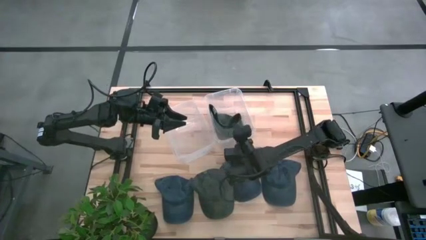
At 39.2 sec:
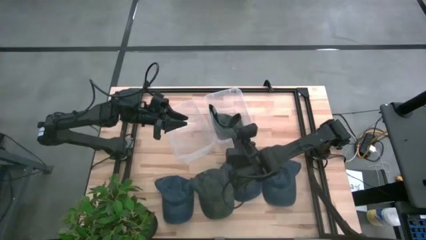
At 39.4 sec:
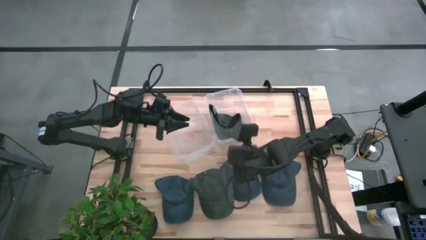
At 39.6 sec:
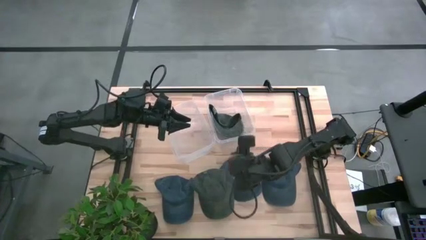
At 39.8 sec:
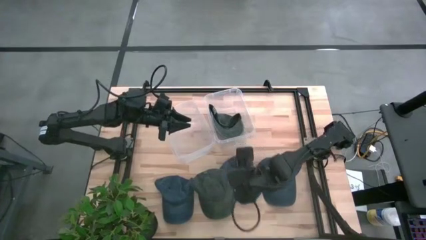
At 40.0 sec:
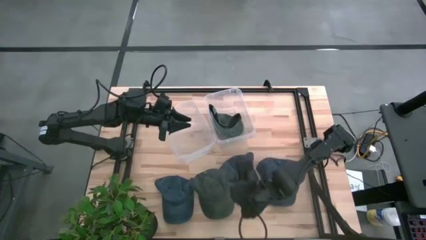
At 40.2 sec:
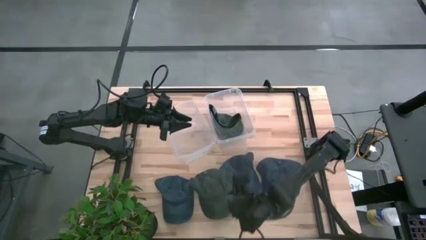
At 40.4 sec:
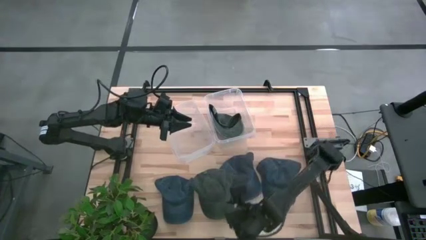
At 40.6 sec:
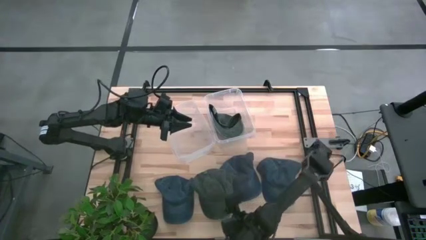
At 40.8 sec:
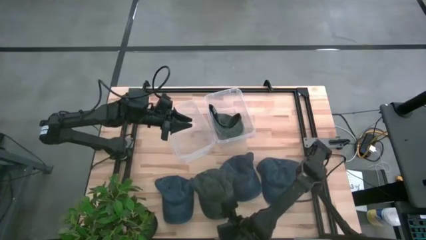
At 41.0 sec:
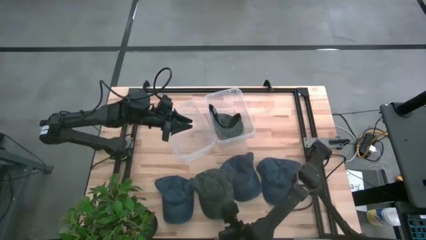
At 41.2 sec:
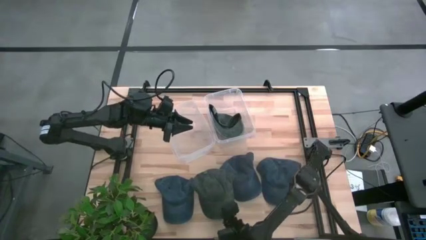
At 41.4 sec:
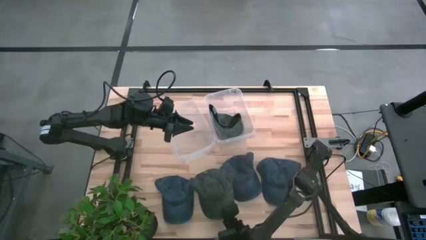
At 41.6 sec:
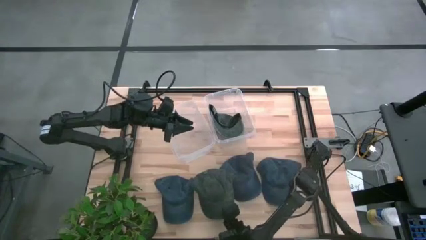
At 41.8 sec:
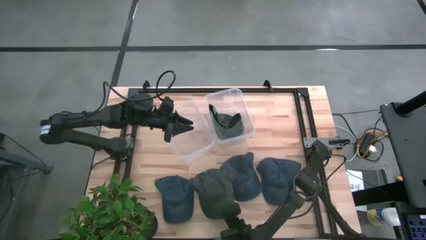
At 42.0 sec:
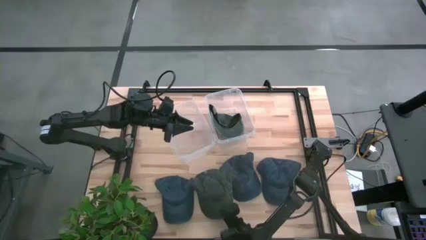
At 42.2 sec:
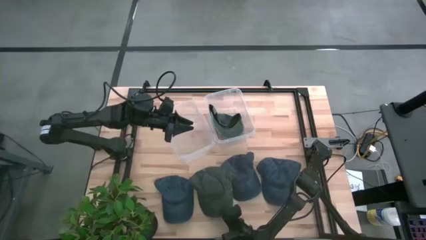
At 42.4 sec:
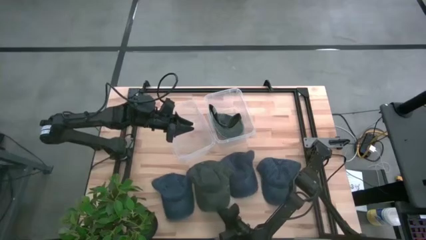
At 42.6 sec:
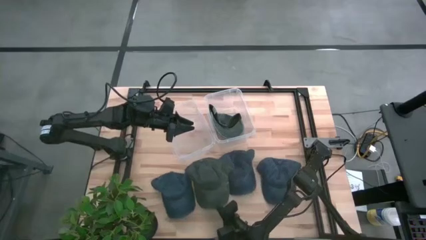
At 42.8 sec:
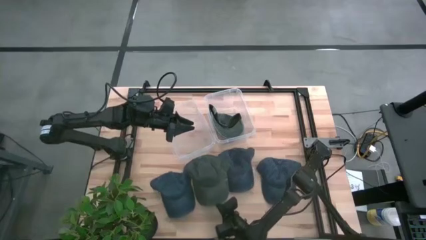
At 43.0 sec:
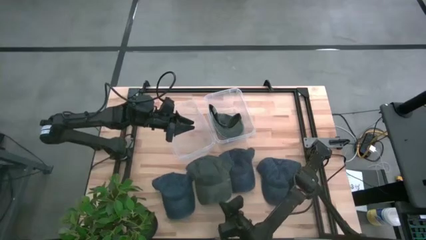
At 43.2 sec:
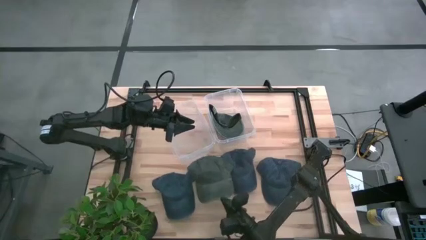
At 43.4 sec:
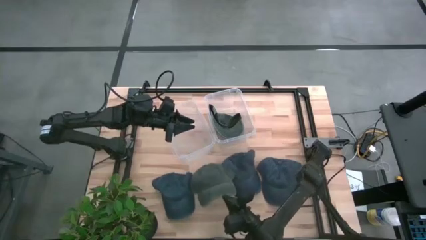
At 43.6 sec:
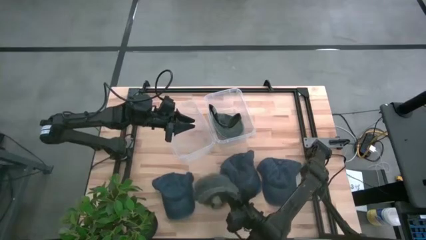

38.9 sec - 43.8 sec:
Task: Pick & Place hat
Put the dark green cap into the right transparent bin

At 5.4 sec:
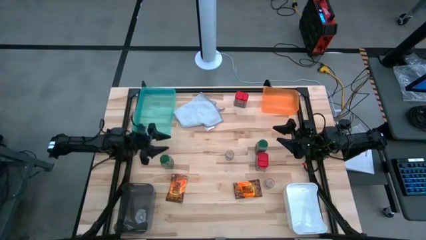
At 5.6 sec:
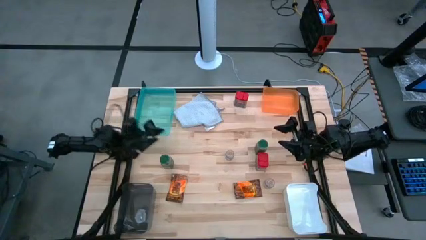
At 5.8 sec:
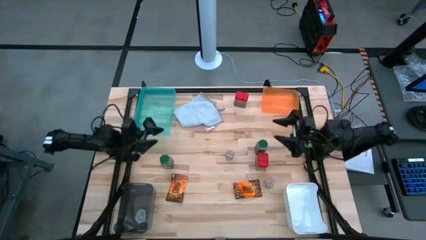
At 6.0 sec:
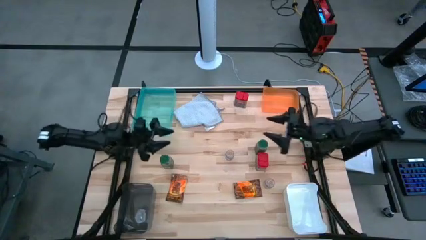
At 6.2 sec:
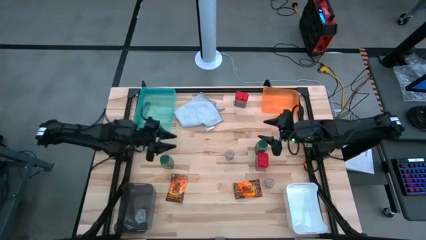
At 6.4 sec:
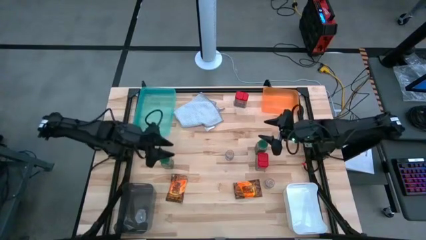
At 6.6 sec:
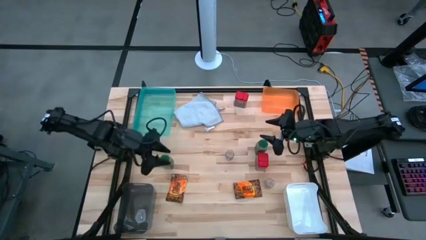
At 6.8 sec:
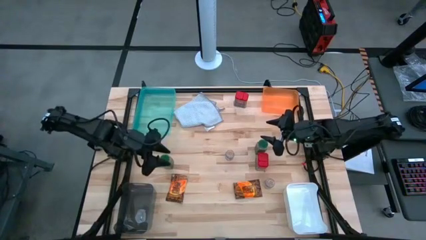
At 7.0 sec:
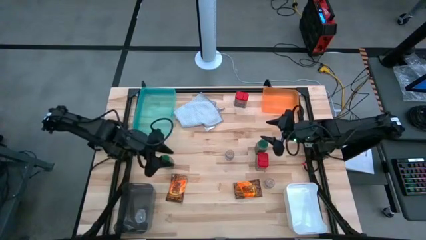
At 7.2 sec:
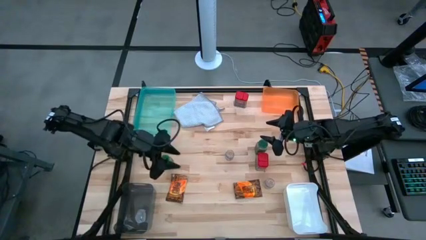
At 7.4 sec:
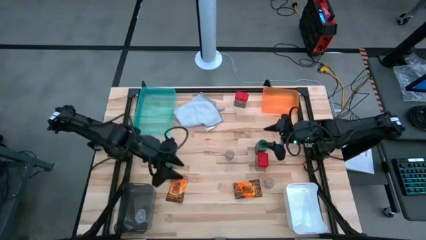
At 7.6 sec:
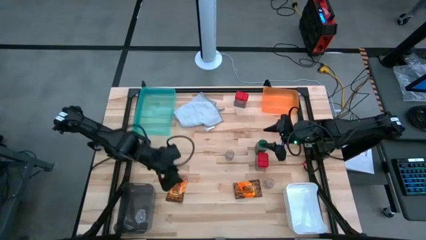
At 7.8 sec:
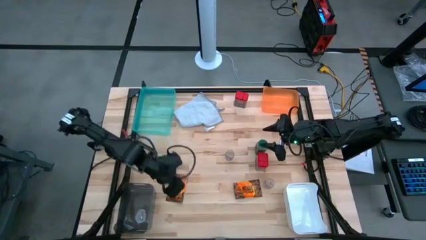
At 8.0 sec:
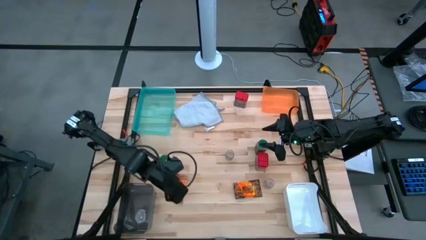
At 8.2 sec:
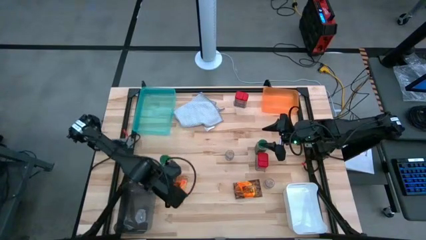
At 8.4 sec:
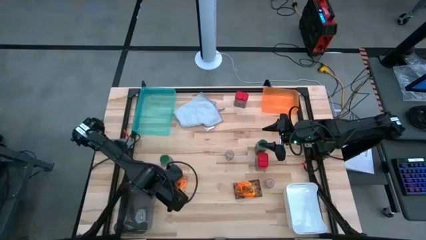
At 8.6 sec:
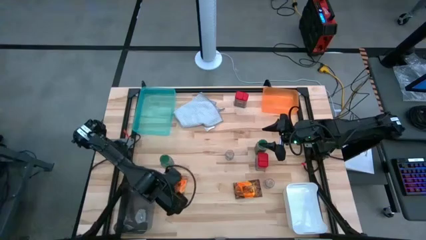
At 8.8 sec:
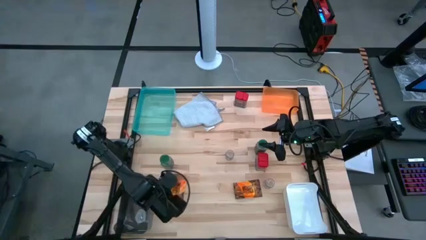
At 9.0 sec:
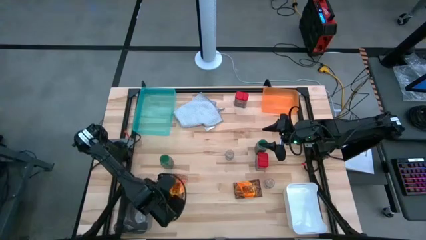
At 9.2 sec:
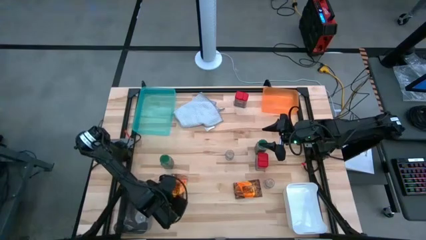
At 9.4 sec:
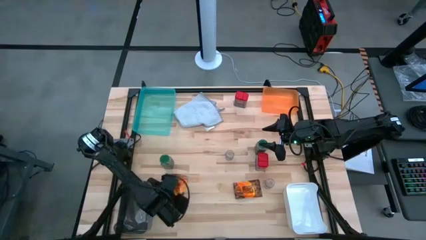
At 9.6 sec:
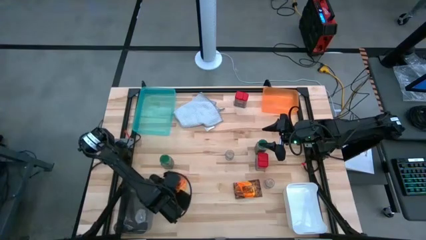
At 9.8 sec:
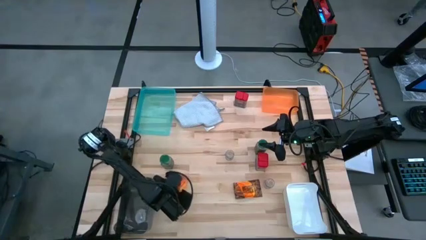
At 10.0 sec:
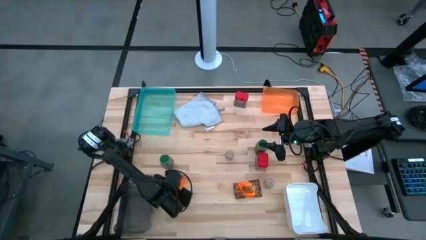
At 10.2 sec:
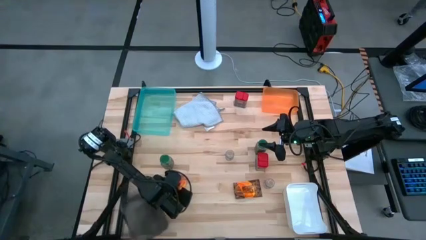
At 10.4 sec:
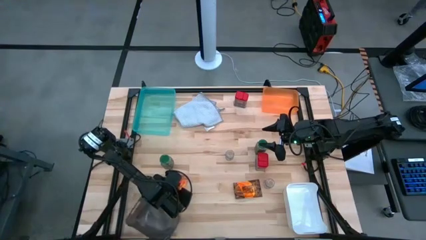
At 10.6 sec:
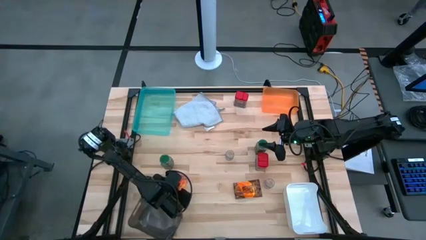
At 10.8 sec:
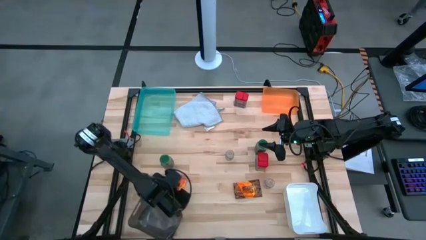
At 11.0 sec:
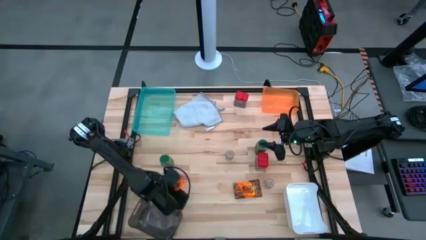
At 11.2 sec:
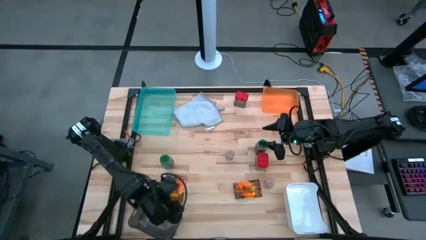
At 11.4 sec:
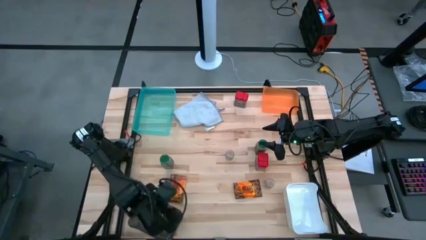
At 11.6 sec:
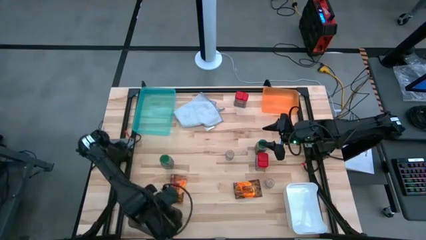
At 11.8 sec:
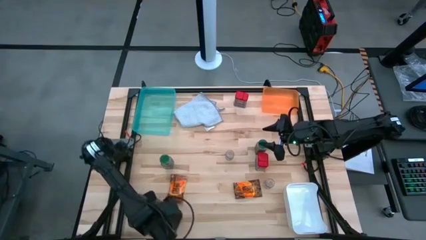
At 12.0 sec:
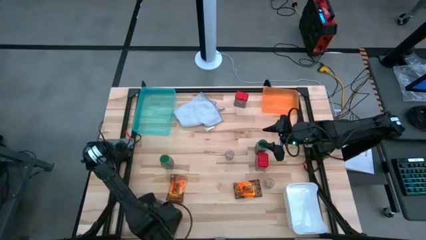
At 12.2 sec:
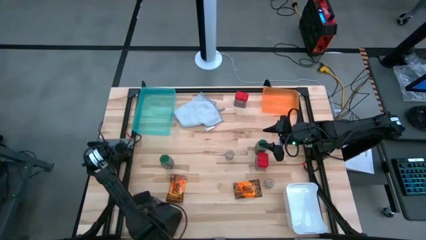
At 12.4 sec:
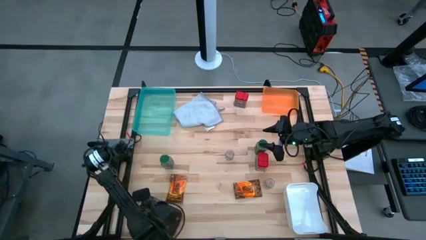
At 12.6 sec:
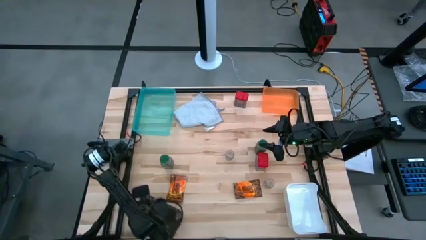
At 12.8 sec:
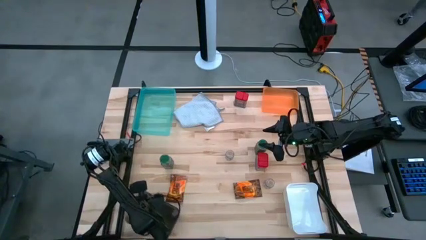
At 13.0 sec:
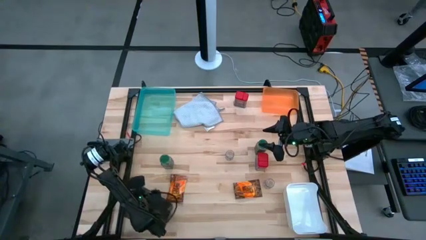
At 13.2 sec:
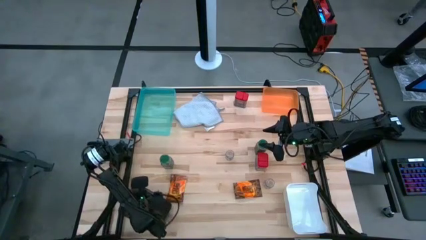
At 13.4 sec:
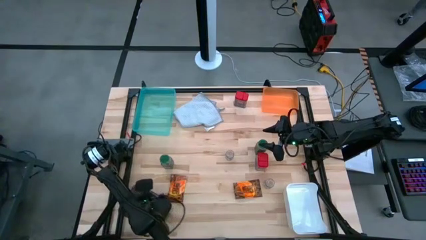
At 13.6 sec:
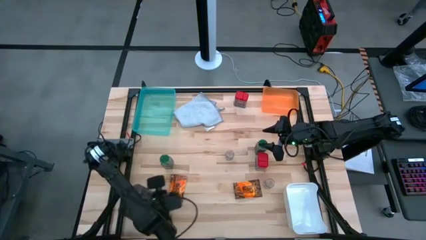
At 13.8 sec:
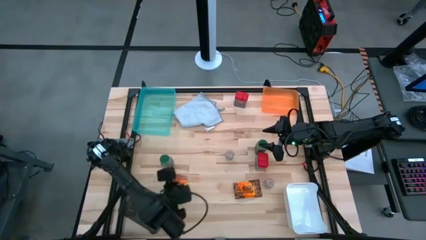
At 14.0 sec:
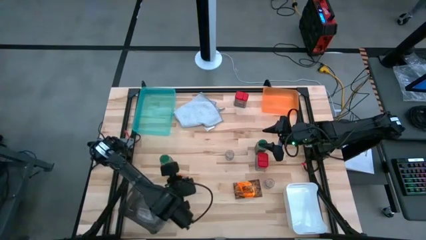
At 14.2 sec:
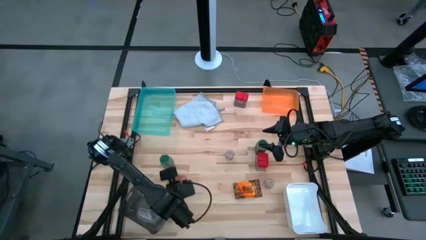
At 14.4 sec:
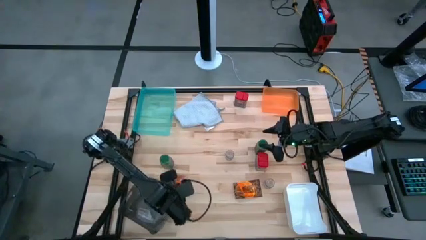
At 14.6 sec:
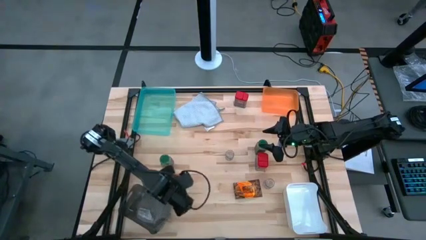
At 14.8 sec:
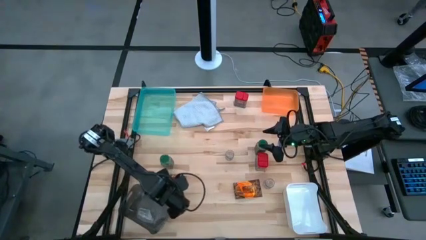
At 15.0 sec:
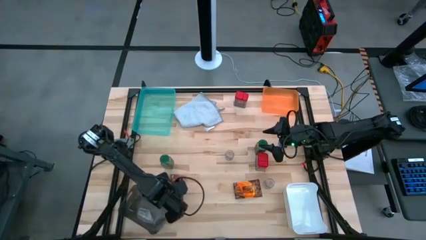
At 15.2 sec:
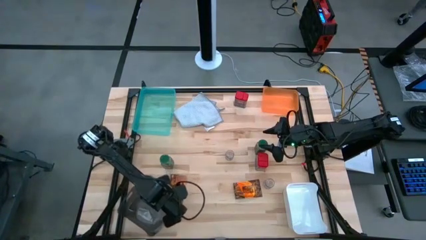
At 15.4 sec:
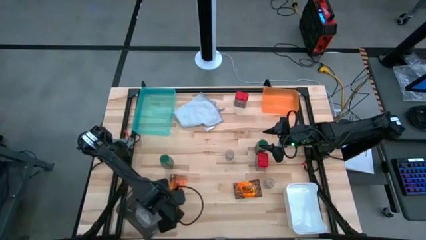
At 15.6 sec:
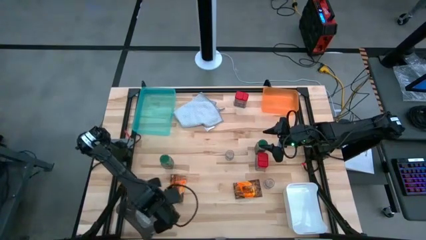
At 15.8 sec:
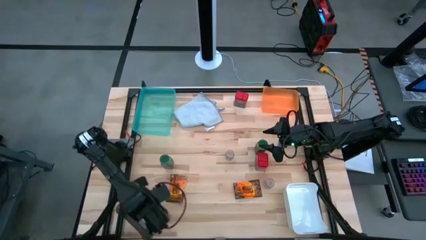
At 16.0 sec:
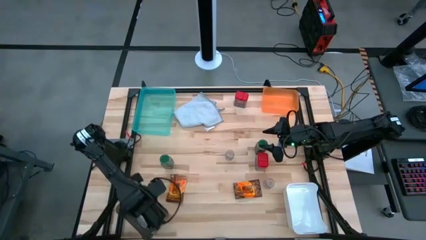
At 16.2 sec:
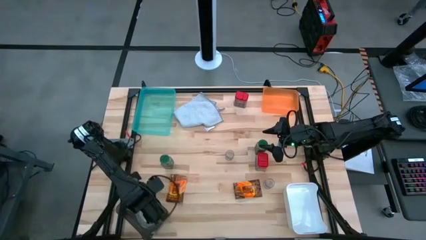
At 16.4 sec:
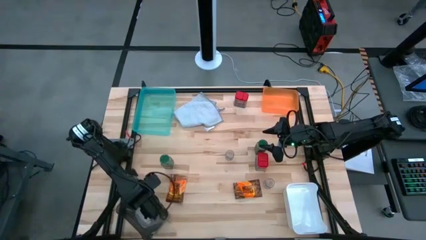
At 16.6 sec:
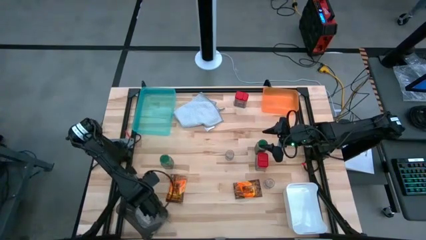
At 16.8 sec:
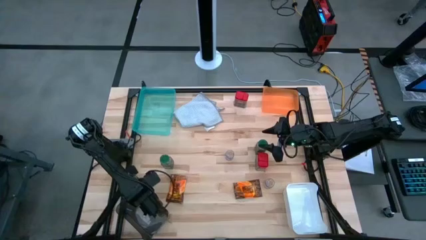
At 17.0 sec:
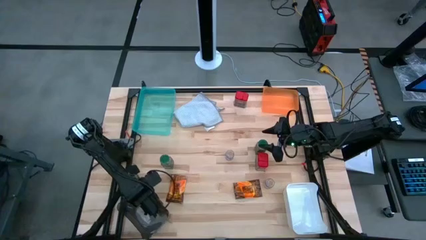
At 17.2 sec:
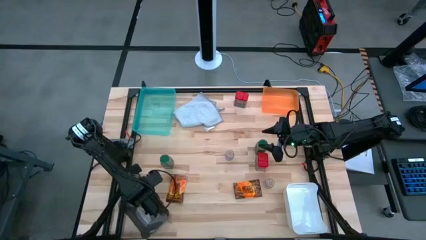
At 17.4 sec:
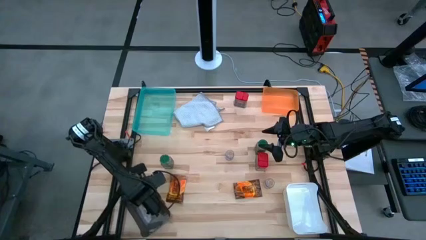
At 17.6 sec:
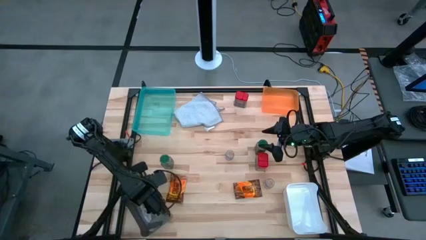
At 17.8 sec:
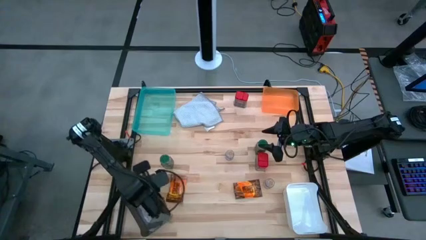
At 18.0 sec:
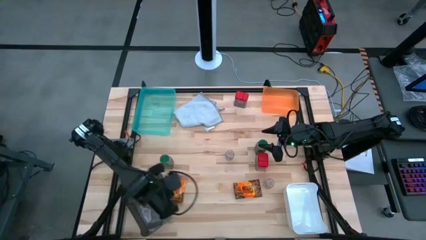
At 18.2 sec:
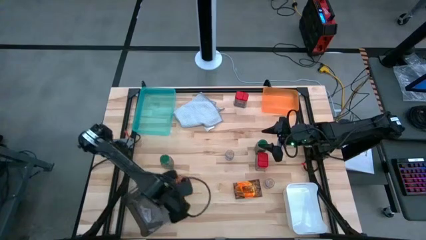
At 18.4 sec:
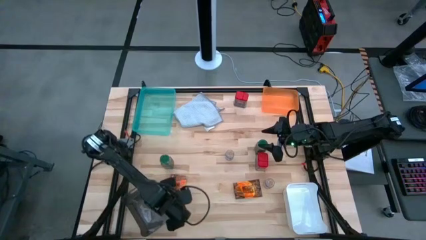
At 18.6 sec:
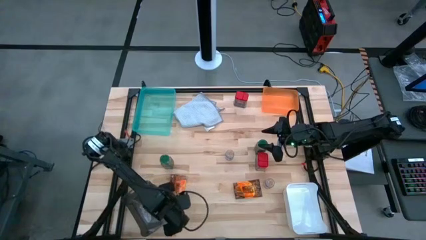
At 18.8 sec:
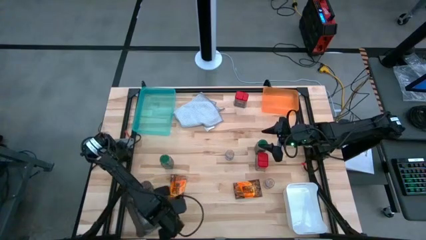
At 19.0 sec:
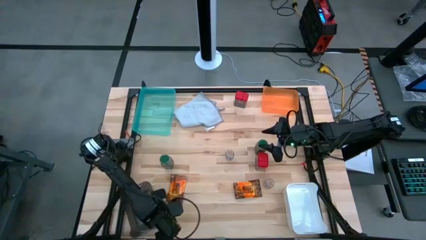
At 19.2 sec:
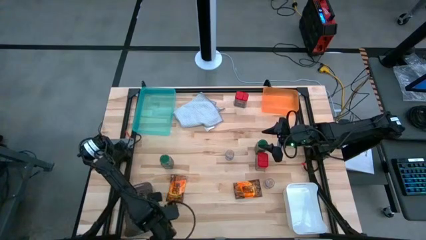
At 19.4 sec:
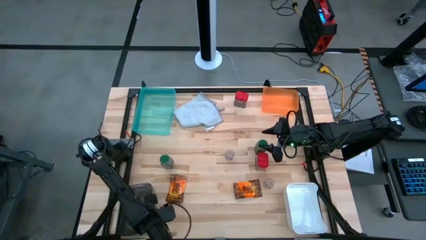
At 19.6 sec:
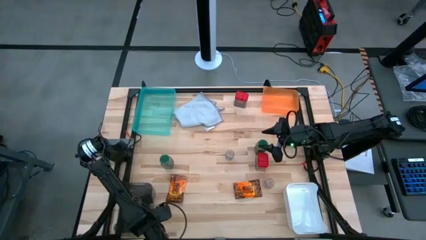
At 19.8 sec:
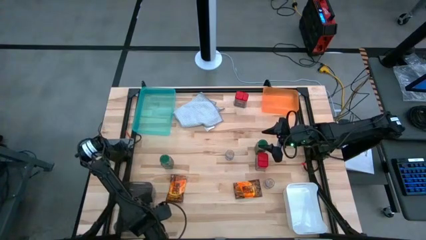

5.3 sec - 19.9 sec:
Task: Sort spices by type
Adjust the black bin on the table
